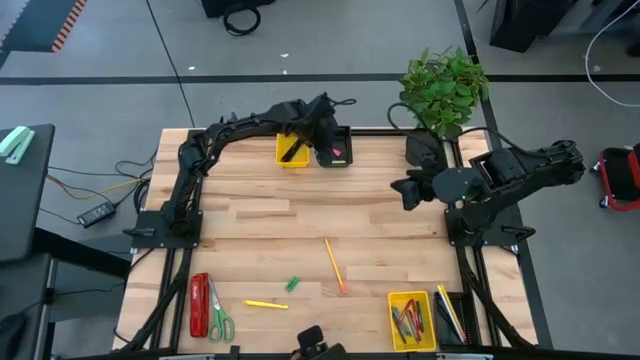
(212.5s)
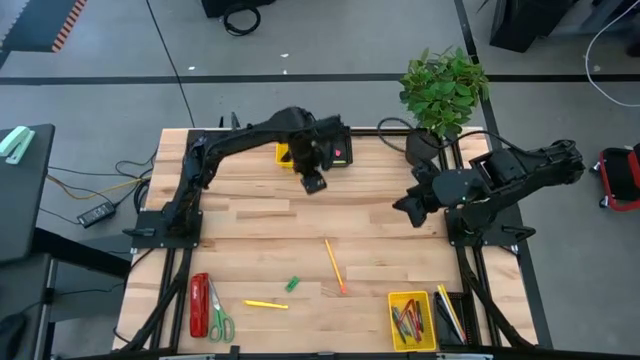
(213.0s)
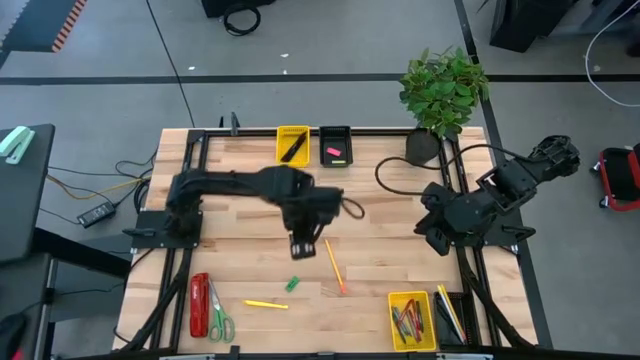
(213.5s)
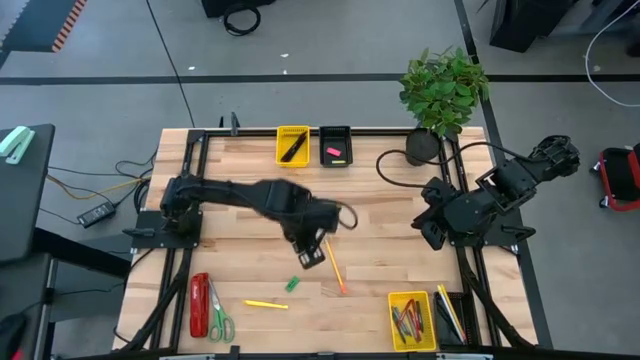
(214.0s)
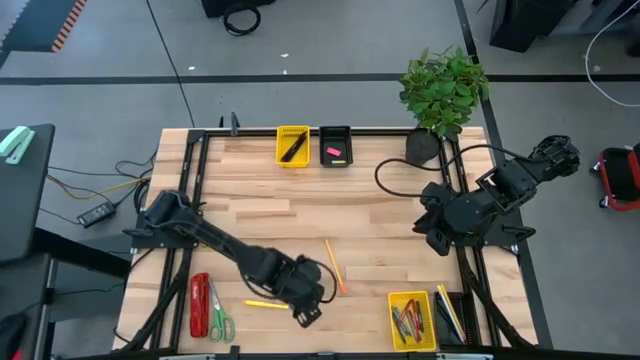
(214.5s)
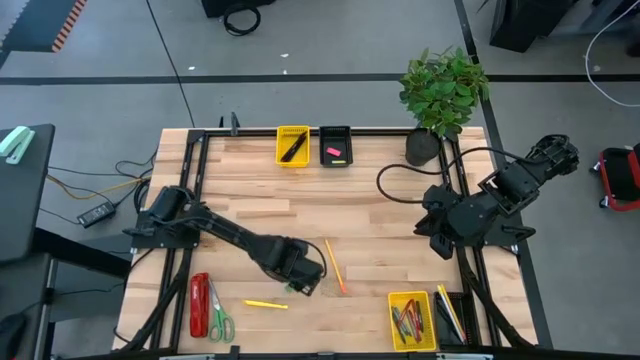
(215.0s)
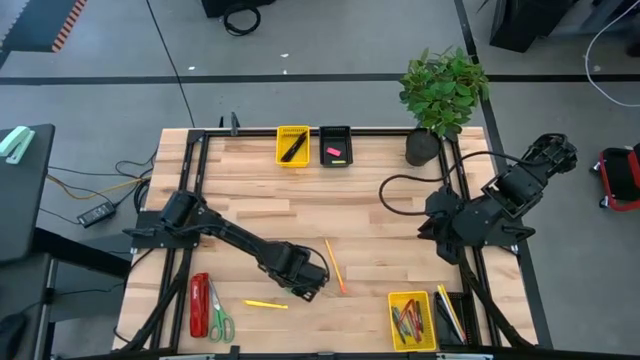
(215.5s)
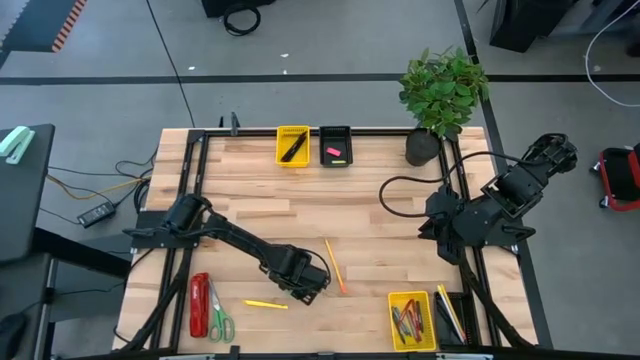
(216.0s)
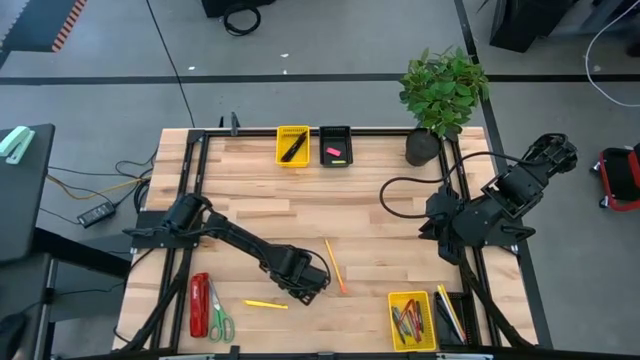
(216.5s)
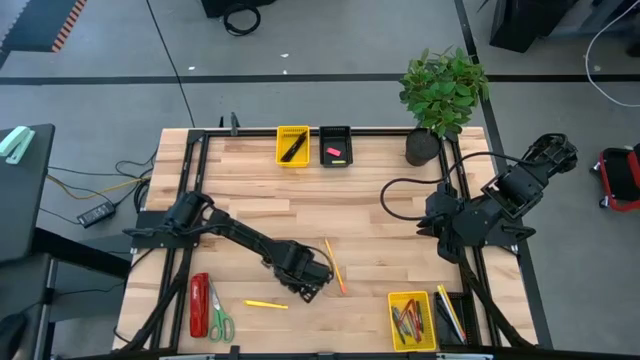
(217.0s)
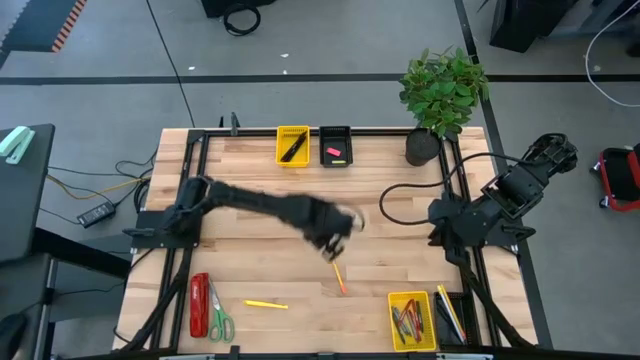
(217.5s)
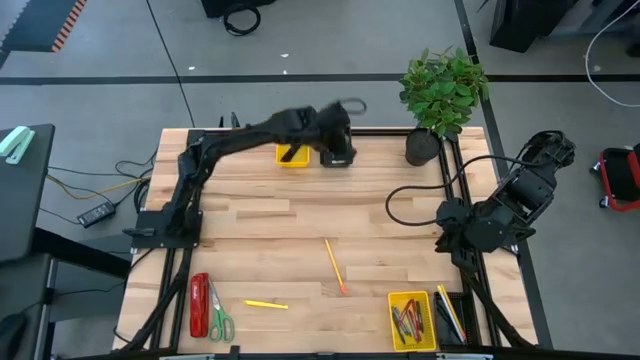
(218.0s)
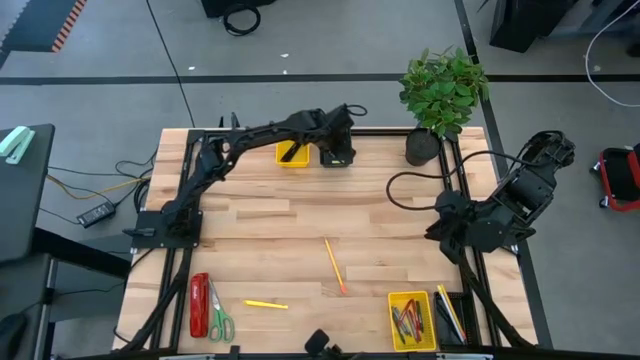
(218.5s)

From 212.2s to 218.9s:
Task: Sort crayons/erasers/pens/pencils in bins
Put the green eraser into the top black bin

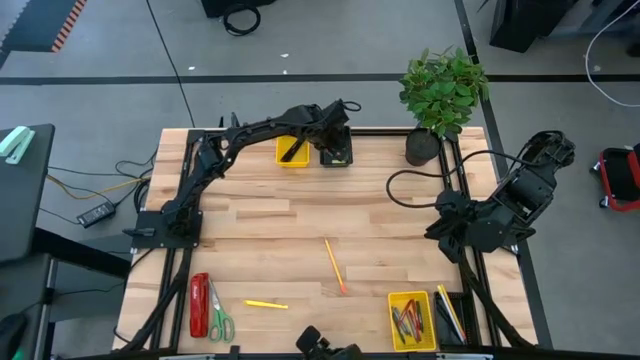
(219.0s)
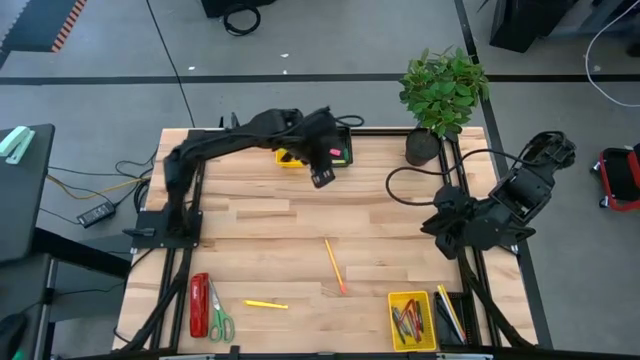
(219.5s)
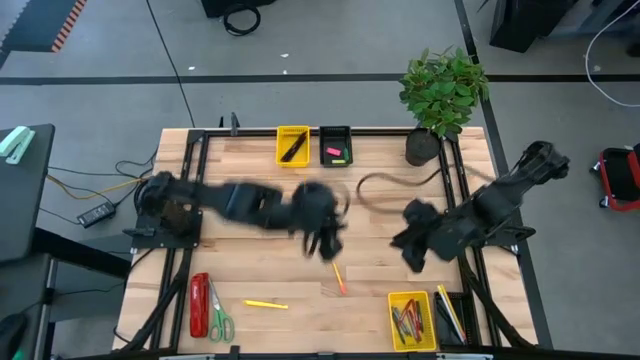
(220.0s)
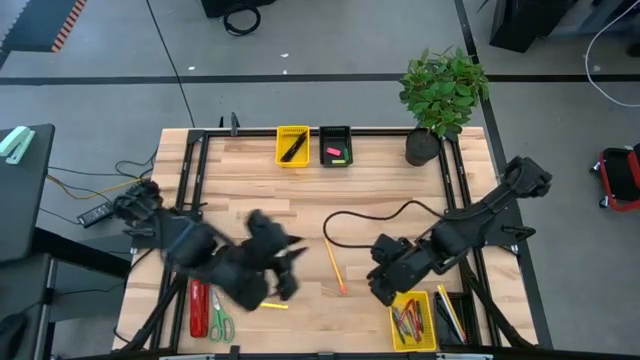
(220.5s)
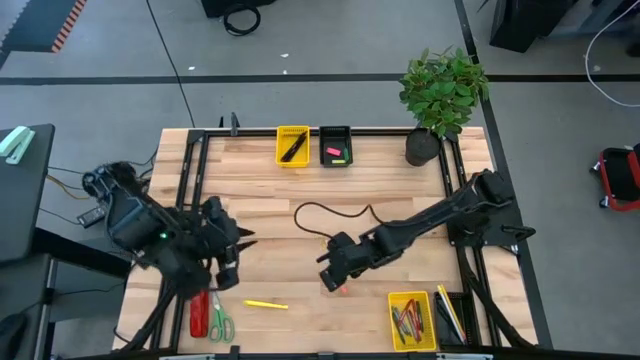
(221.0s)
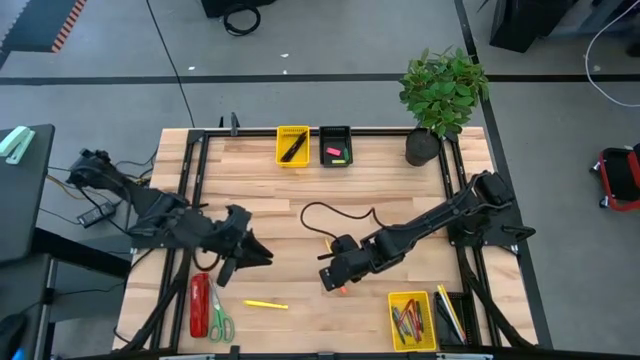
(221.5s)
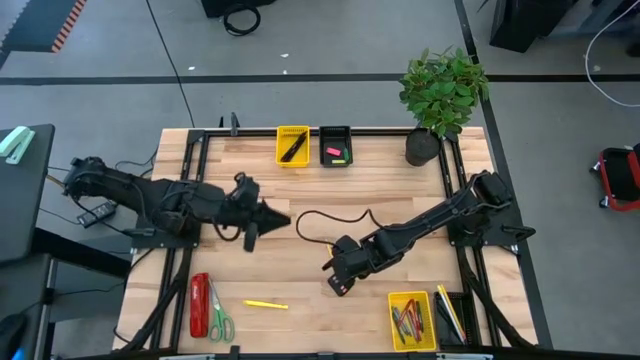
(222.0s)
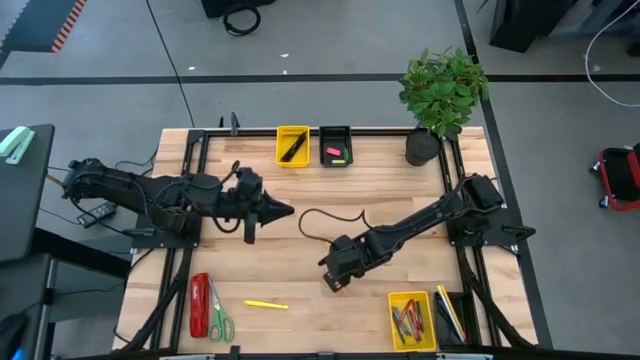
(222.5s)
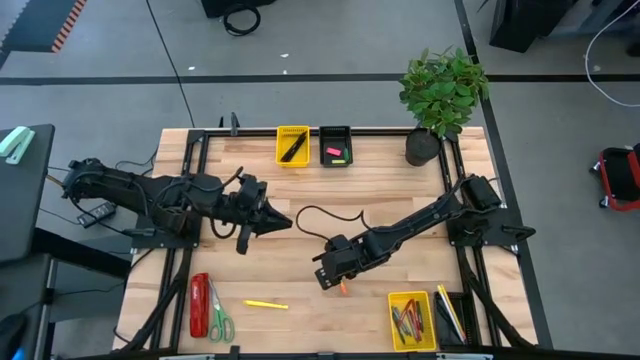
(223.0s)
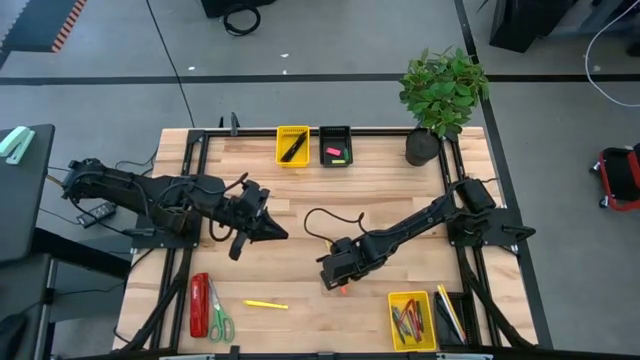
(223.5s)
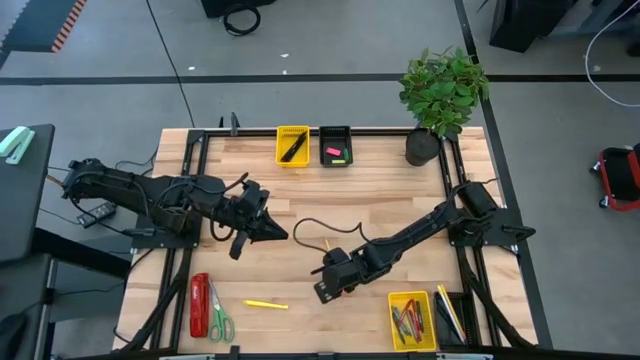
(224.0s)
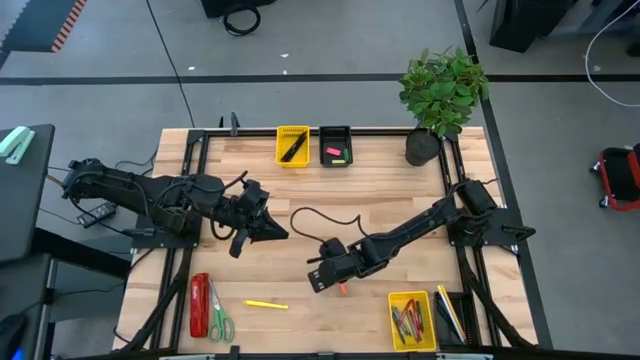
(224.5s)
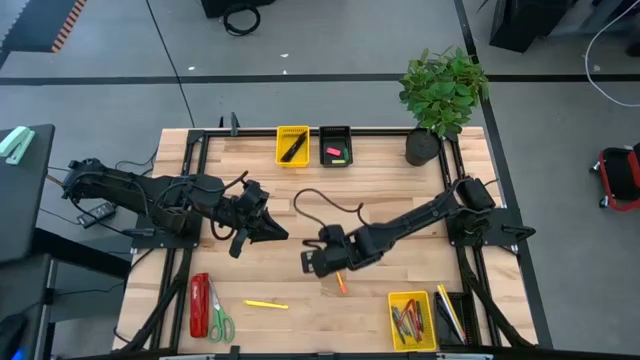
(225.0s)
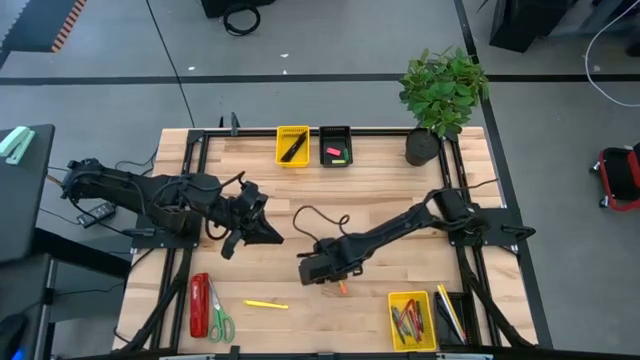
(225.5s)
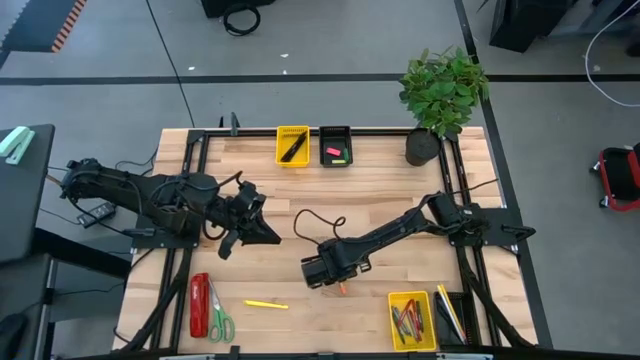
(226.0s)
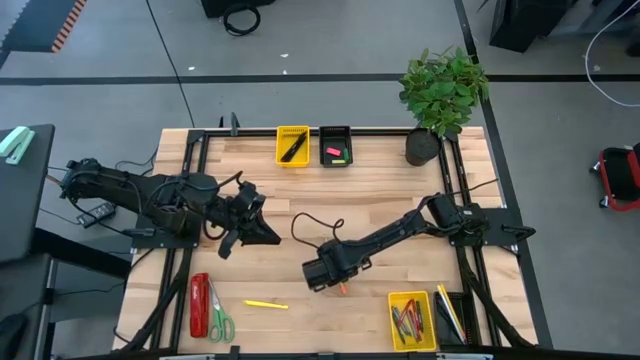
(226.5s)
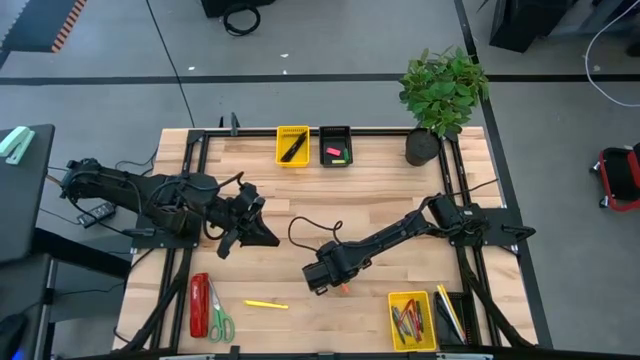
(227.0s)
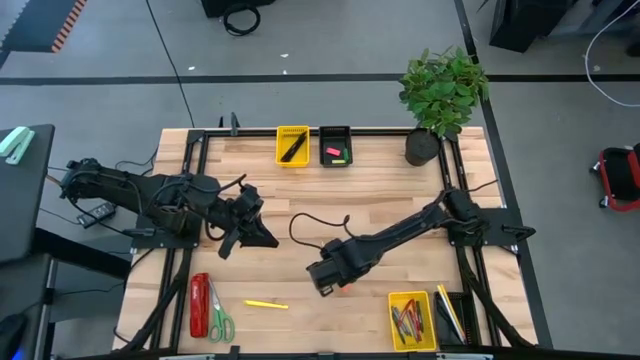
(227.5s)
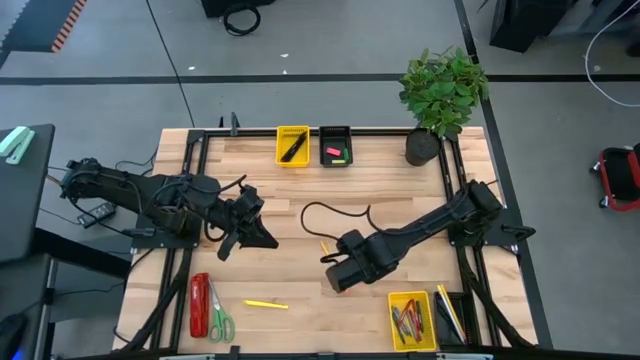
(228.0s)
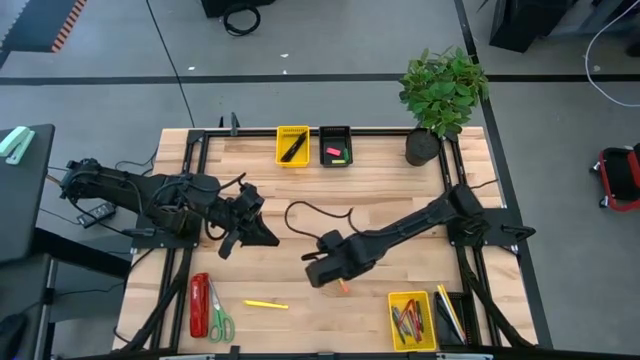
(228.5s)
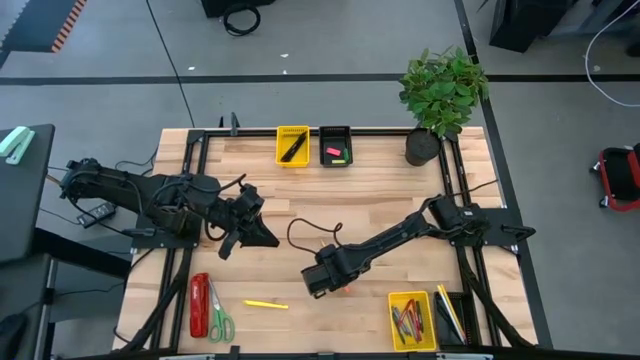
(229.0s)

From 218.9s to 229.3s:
Put the yellow pencil into the bottom black bin

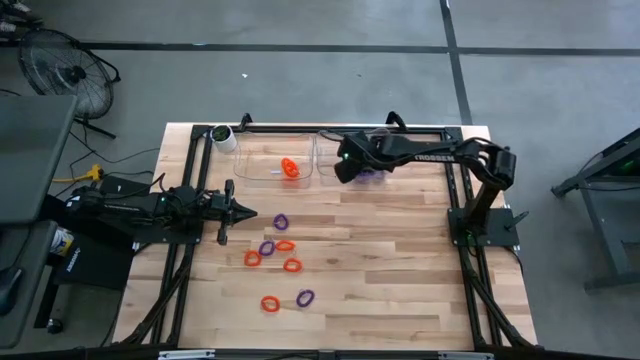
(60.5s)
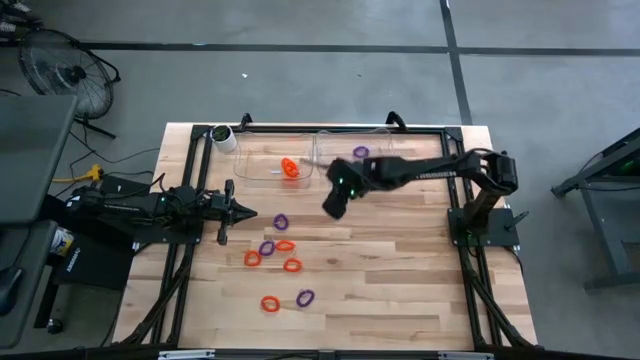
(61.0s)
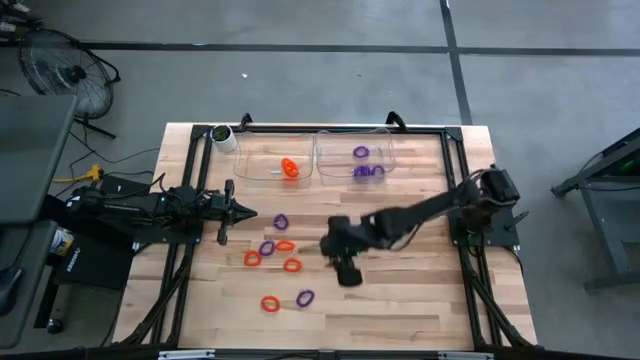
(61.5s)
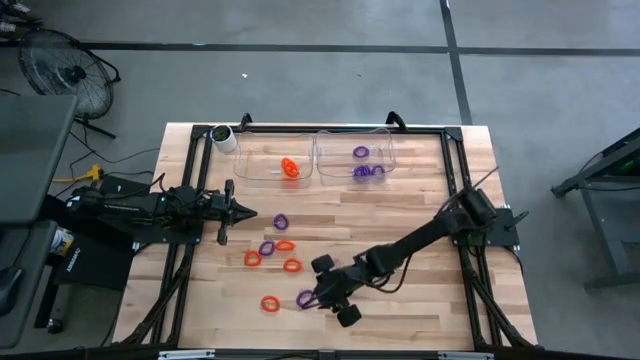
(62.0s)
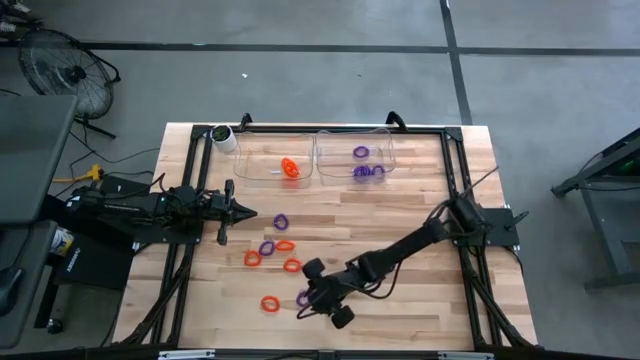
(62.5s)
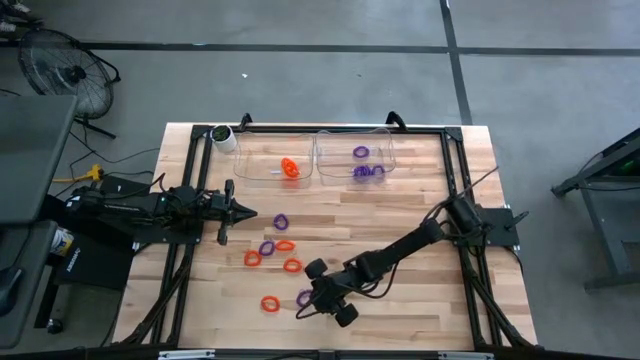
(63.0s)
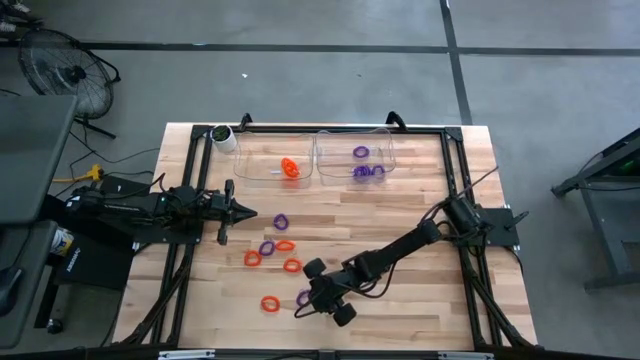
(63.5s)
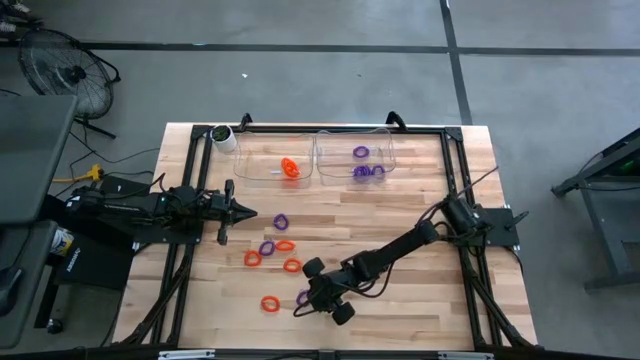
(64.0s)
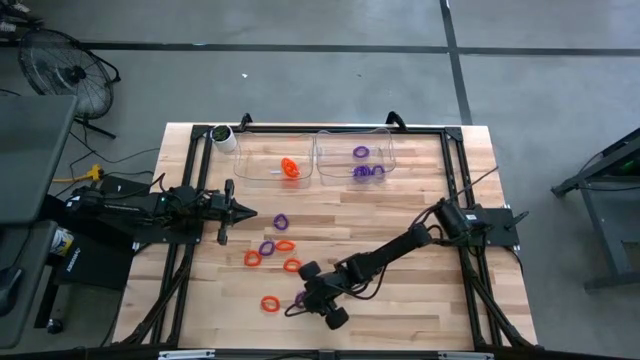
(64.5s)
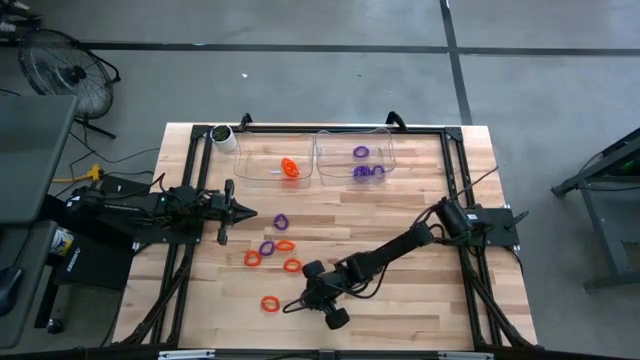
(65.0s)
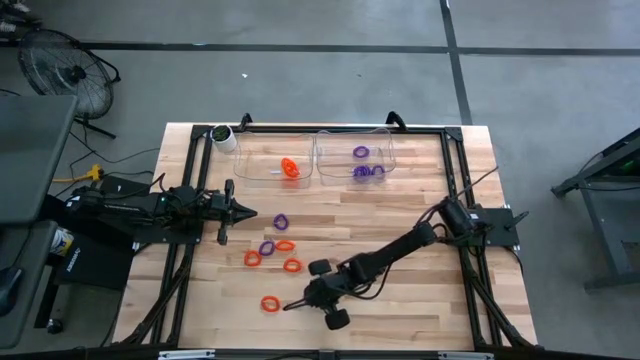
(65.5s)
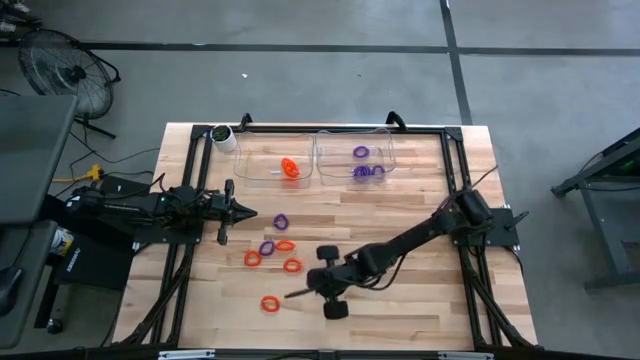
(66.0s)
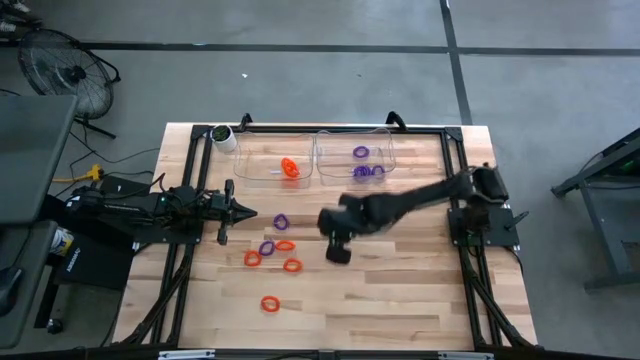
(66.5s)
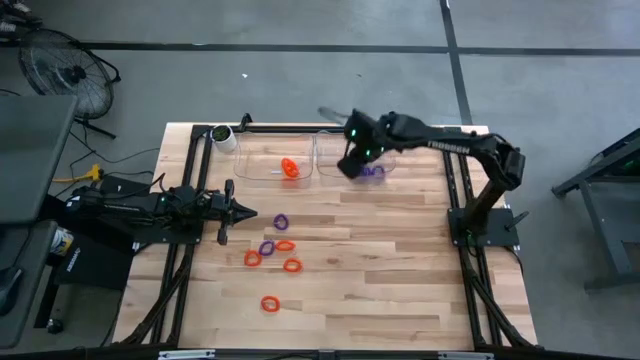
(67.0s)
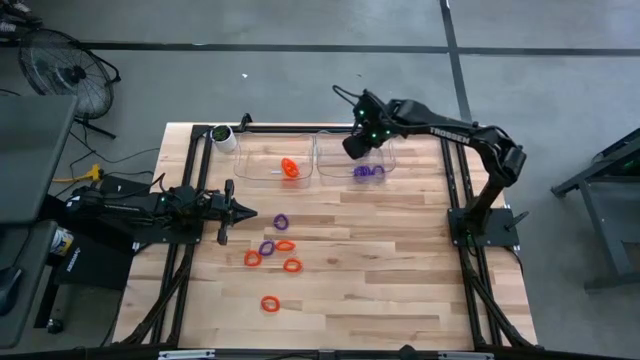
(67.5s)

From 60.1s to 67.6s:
Task: Sort spring keychains
Put the bottom violet spring keychain into the right bin
